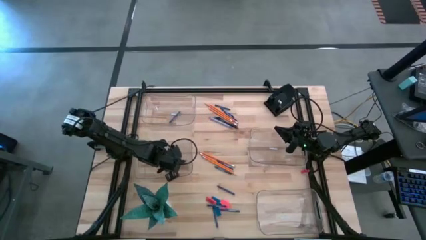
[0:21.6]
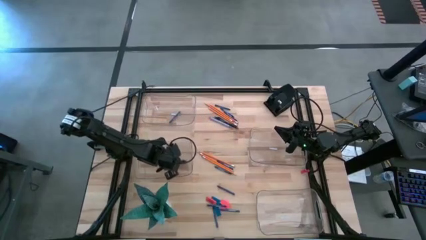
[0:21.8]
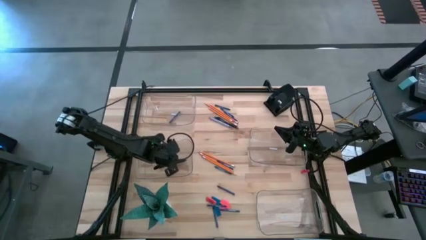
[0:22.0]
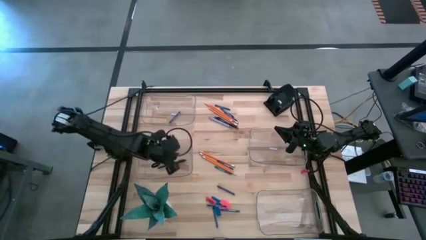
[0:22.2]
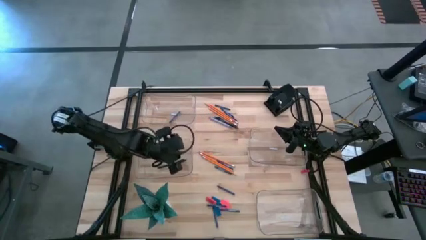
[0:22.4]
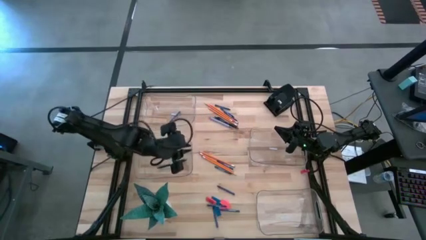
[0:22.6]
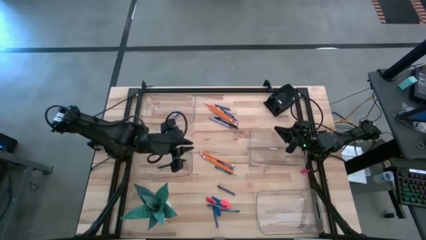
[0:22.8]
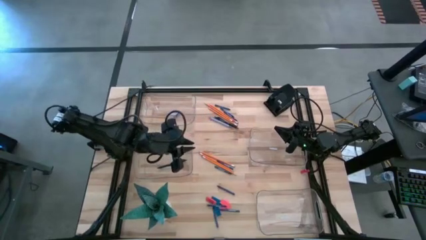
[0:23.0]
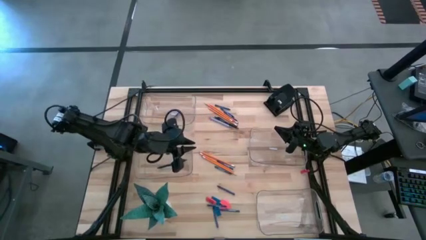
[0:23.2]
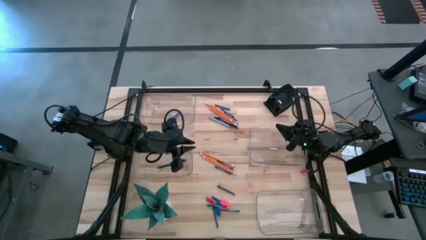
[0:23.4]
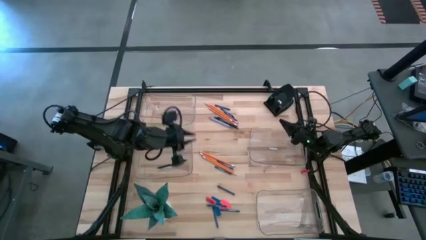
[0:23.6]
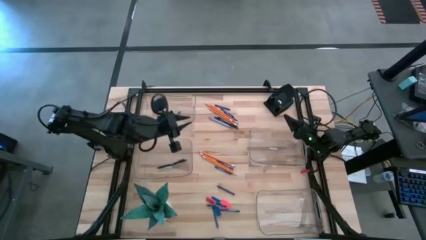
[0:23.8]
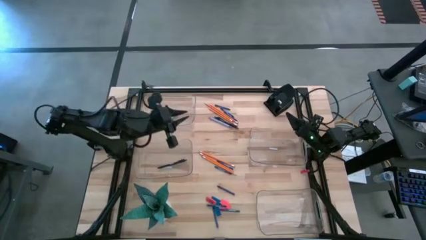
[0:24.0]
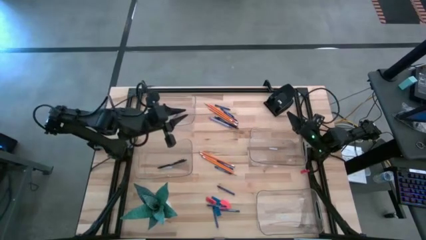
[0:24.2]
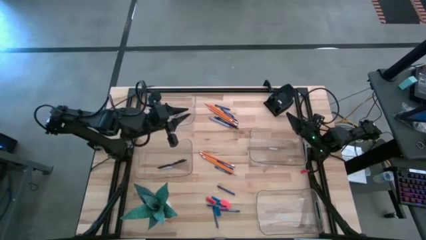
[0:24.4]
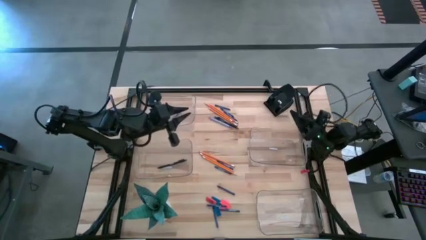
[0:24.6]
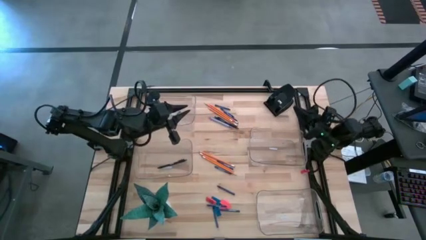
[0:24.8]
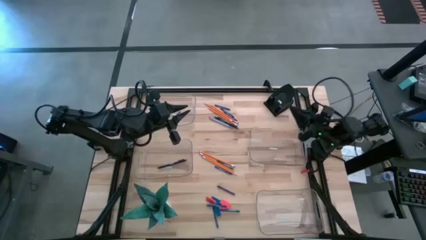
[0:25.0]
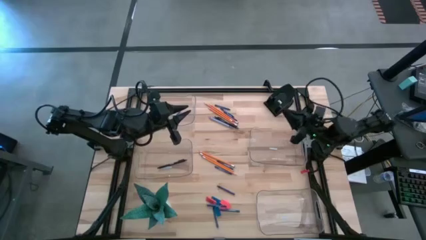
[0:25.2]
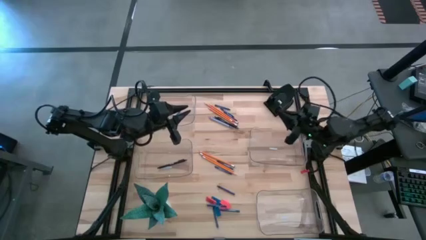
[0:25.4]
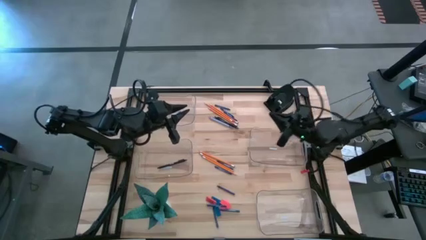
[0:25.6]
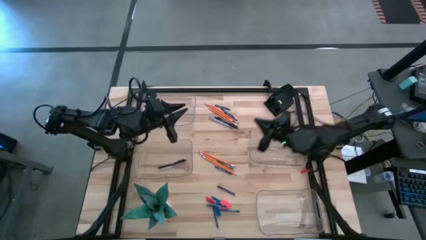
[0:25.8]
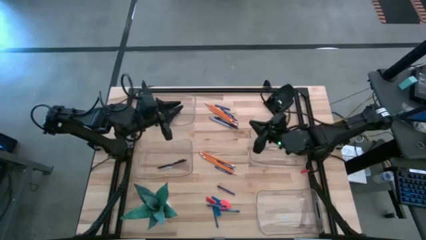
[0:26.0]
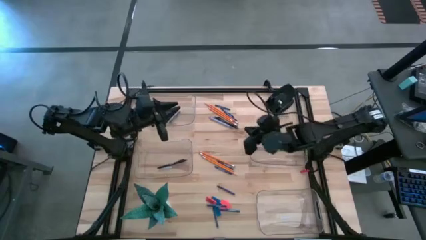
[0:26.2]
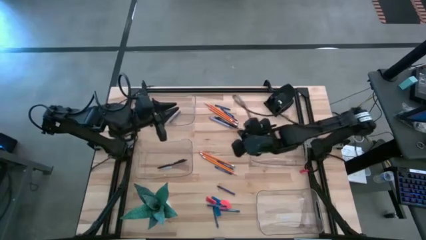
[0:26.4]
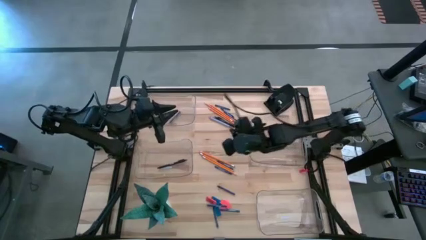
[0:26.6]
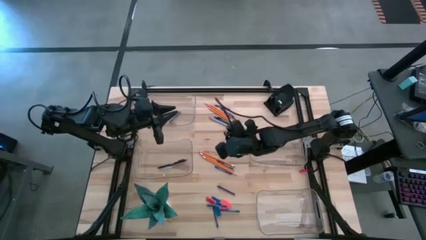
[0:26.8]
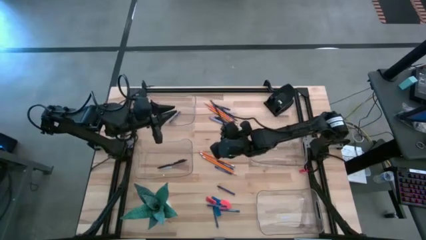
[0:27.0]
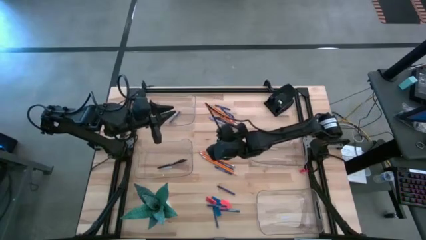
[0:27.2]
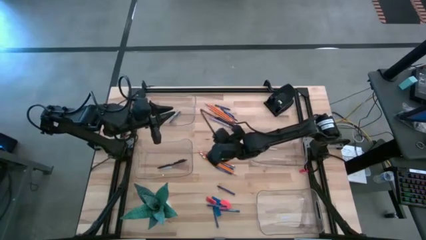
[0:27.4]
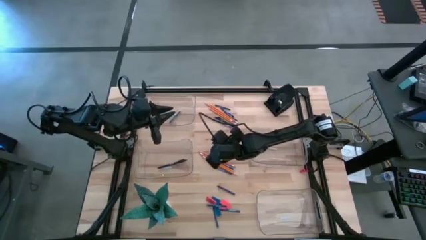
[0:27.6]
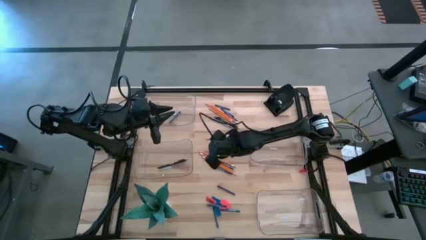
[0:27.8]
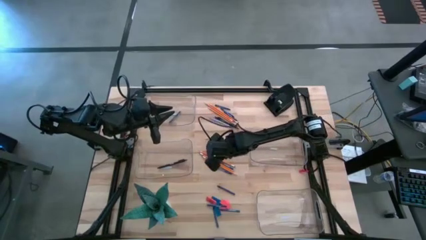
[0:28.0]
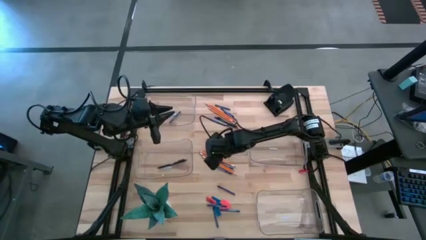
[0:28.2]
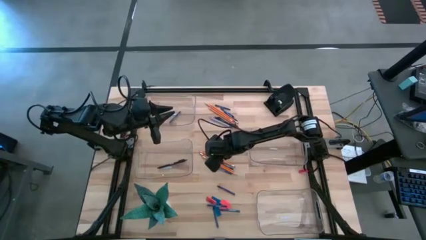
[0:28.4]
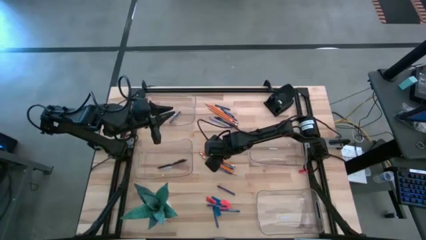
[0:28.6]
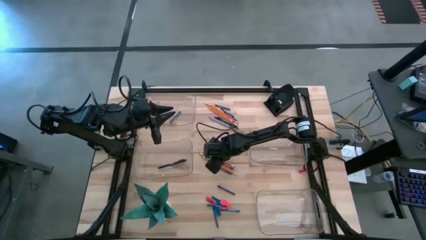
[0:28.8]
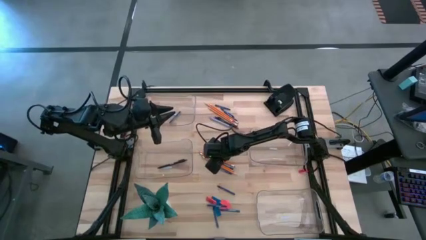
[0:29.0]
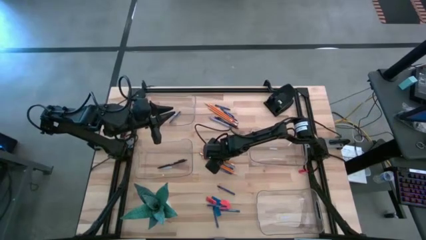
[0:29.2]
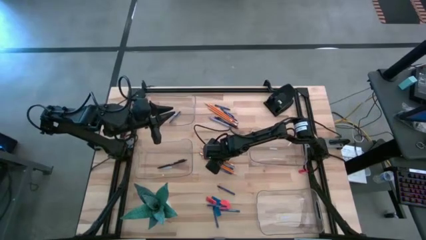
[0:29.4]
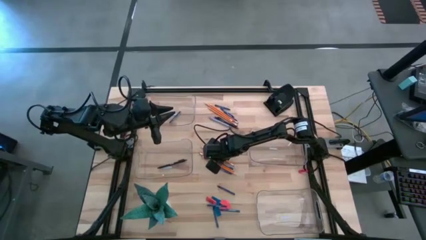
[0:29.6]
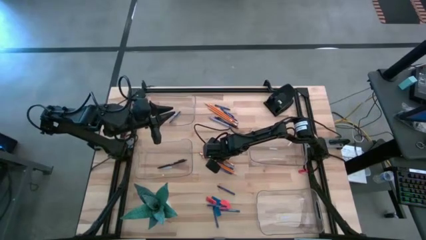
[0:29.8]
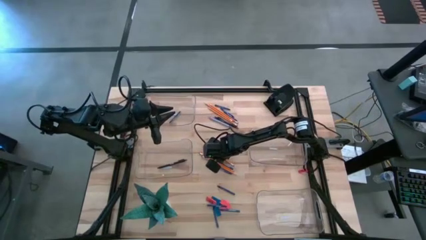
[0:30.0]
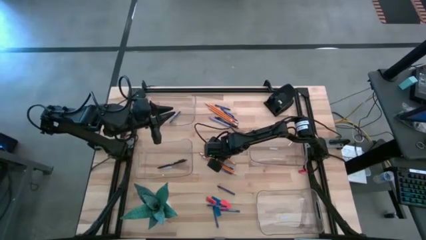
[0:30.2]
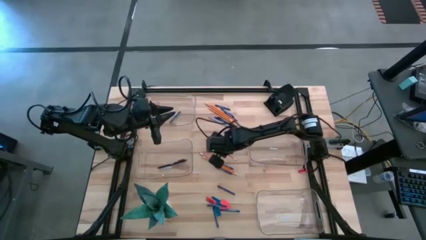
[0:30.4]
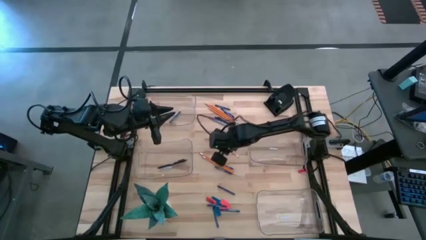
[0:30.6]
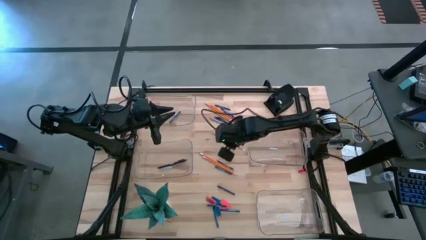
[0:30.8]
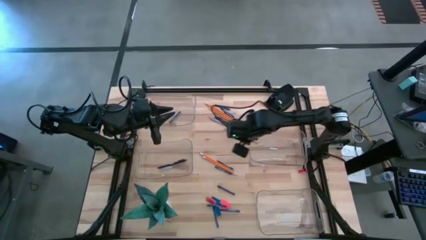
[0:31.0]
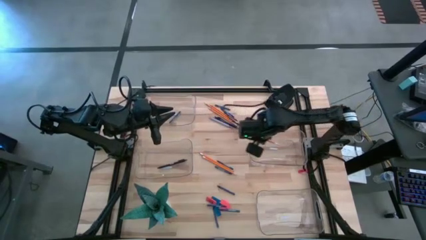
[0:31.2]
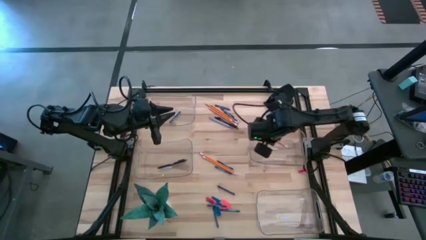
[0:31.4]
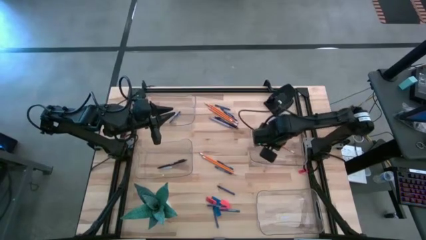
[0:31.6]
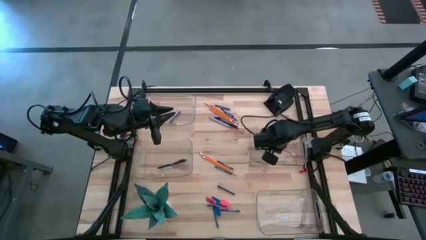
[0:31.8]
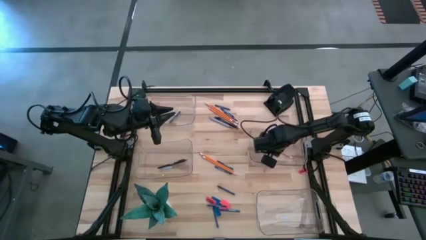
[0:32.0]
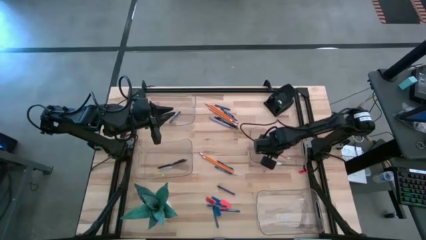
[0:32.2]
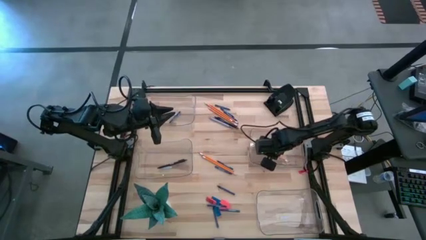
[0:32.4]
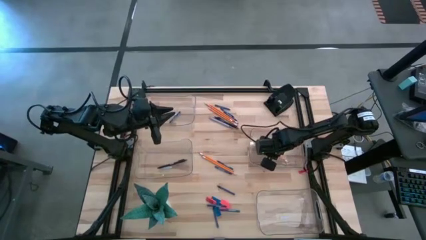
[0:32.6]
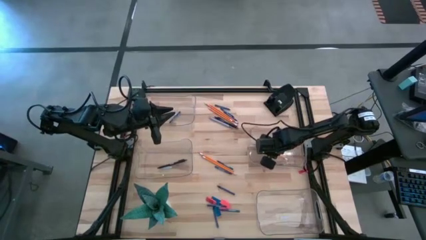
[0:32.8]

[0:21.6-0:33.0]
Task: Sort crayons/erasers/pens/pencils in bins
Put the orange pencil into the middle right transparent bin

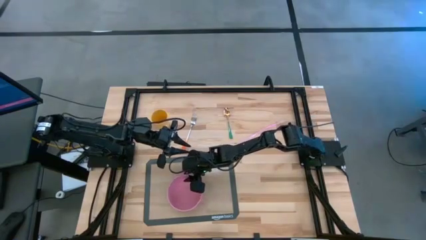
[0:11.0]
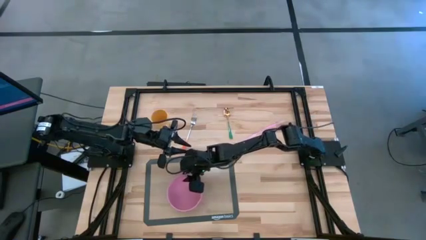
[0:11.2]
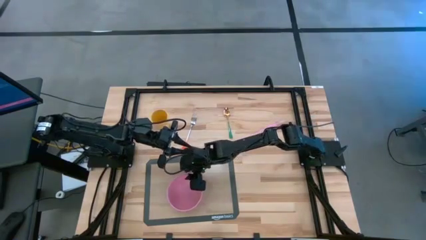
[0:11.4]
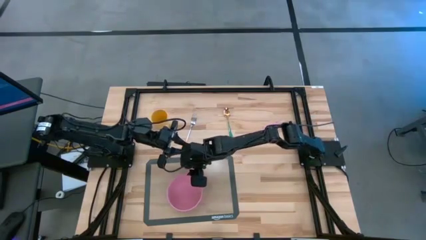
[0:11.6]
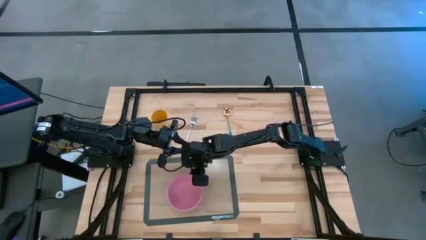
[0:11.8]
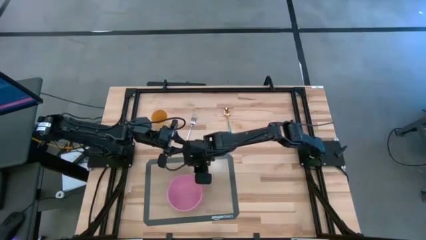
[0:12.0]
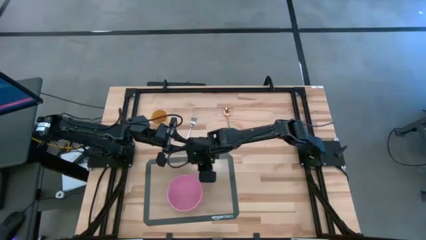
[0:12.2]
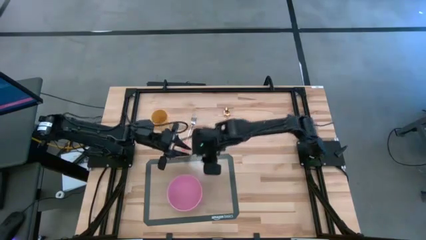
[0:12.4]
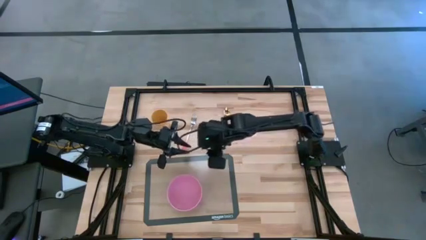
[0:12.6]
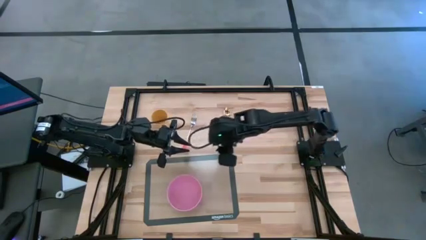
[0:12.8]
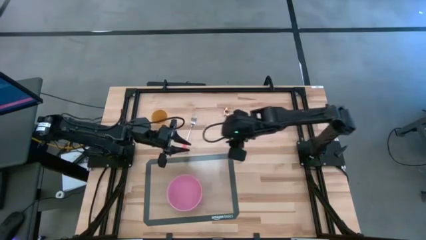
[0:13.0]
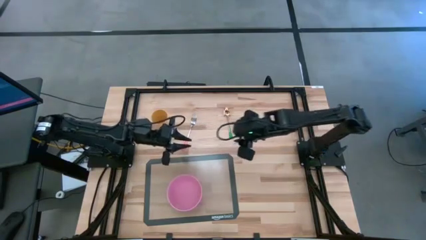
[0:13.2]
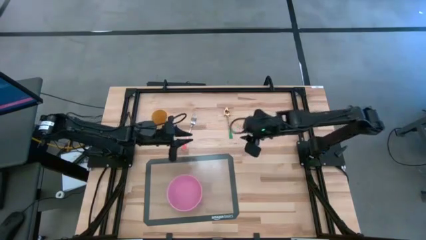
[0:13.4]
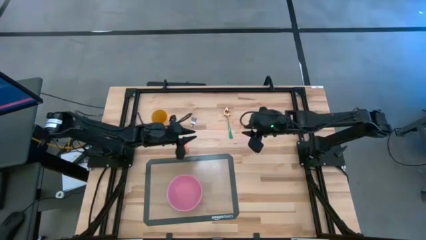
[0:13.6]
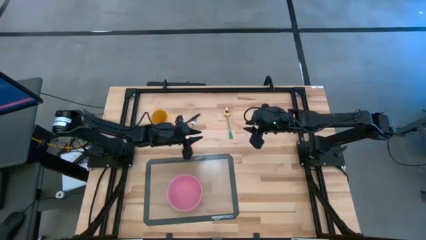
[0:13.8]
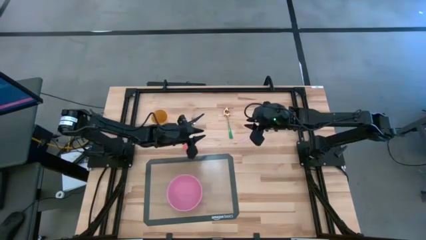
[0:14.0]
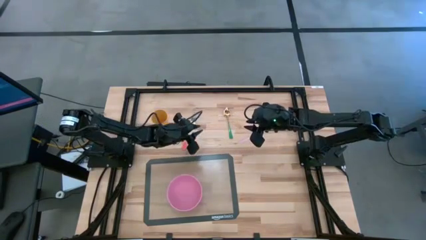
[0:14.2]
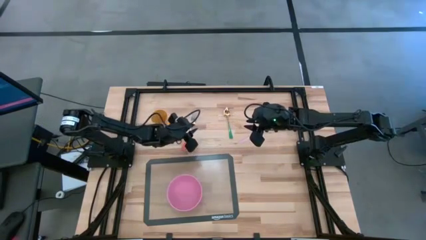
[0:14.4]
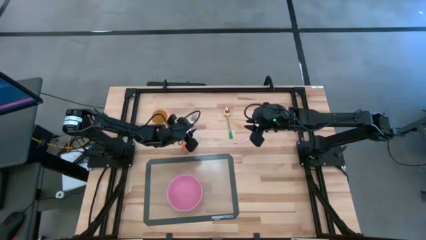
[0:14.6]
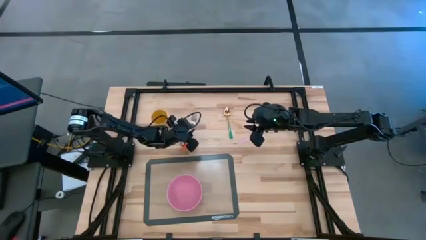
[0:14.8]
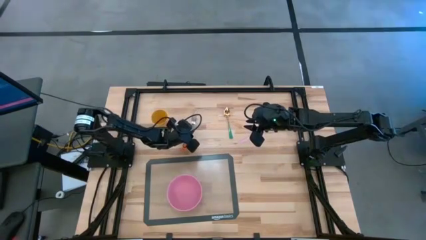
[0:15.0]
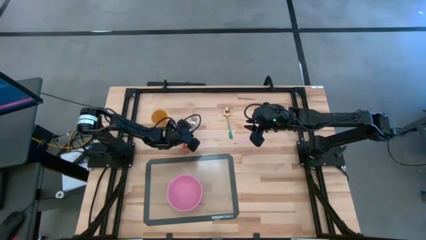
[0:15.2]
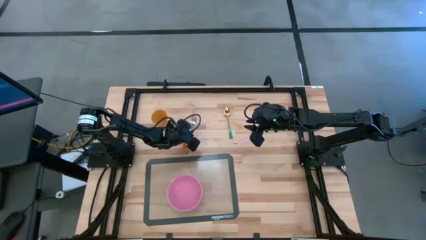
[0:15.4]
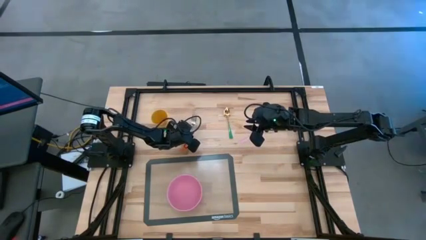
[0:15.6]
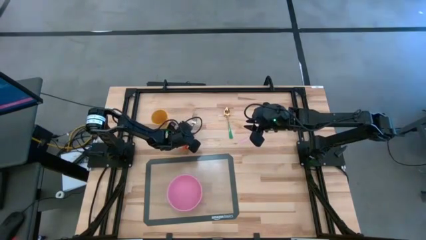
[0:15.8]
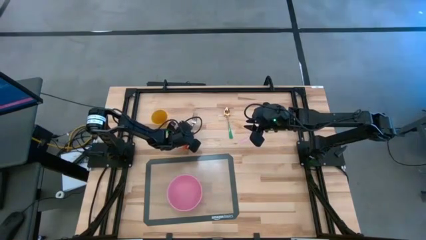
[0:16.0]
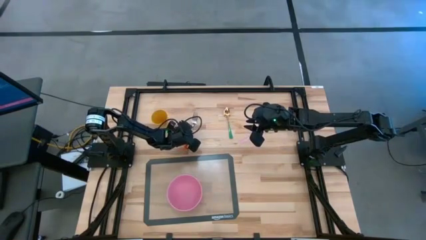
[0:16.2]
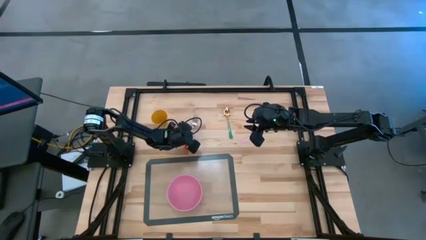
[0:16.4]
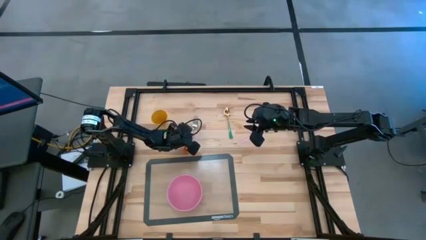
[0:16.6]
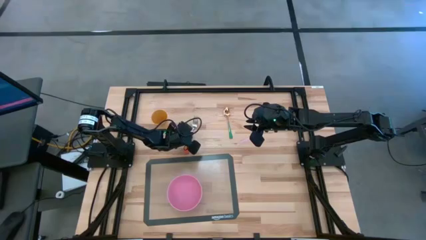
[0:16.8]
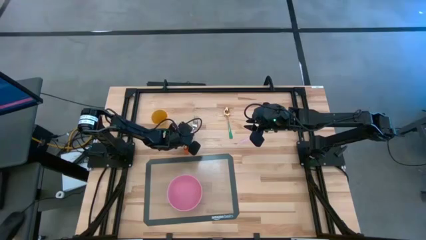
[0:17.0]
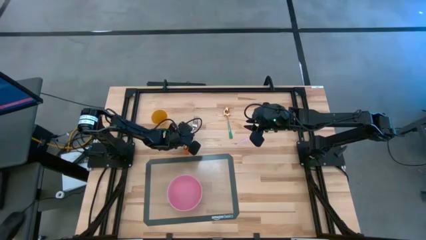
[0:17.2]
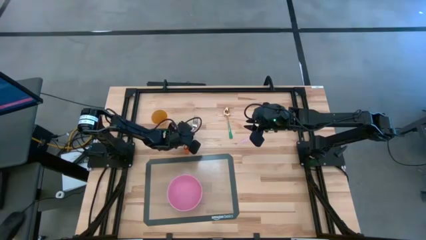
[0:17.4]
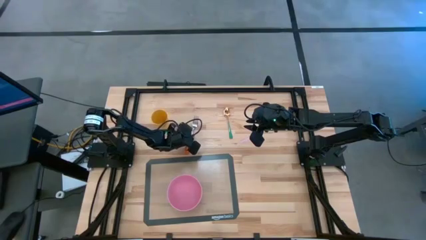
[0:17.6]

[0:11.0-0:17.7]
Task: Pick & Place Utensil
Put the orange fork into the pink bowl on the transparent mat
